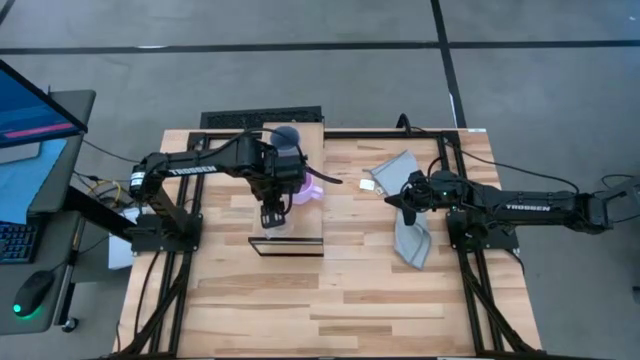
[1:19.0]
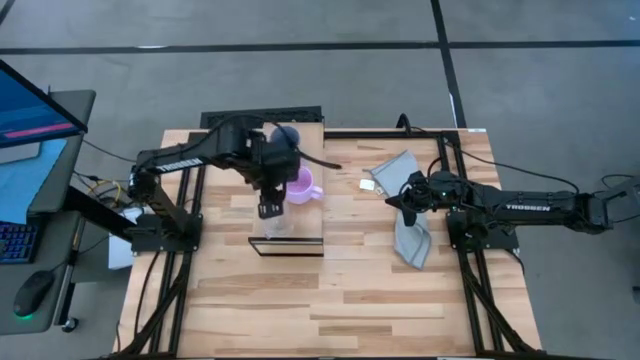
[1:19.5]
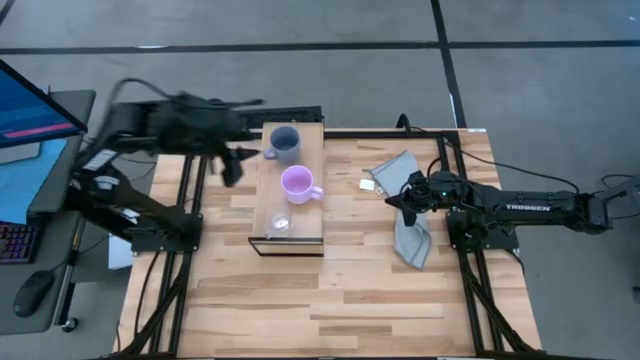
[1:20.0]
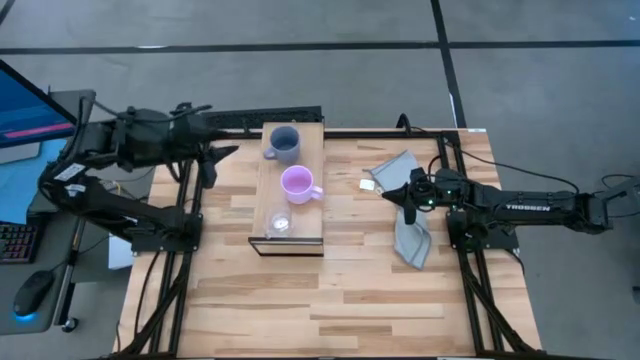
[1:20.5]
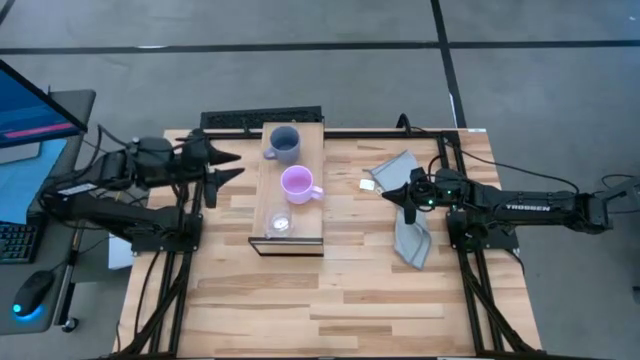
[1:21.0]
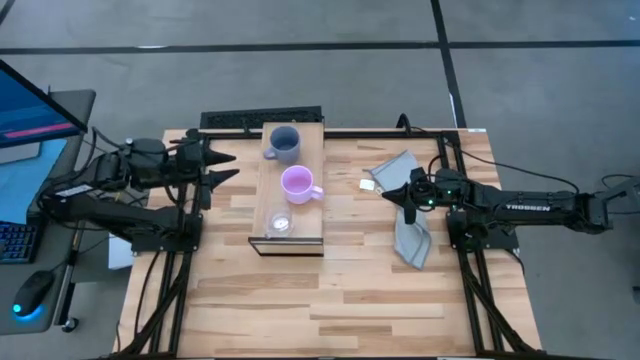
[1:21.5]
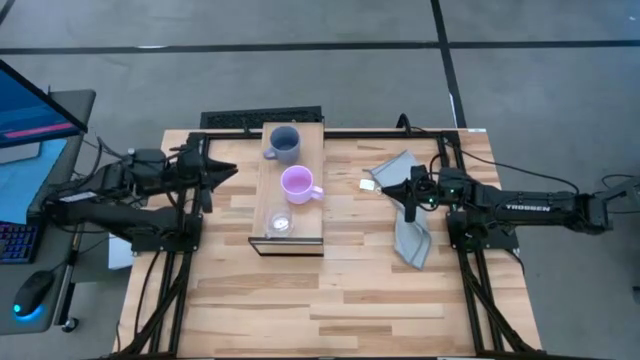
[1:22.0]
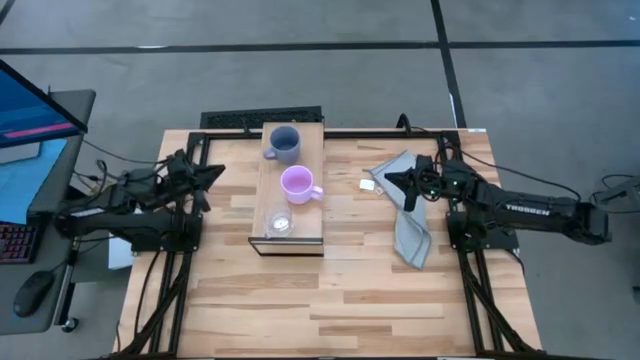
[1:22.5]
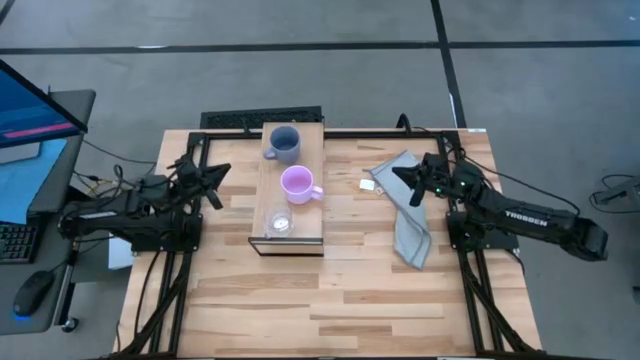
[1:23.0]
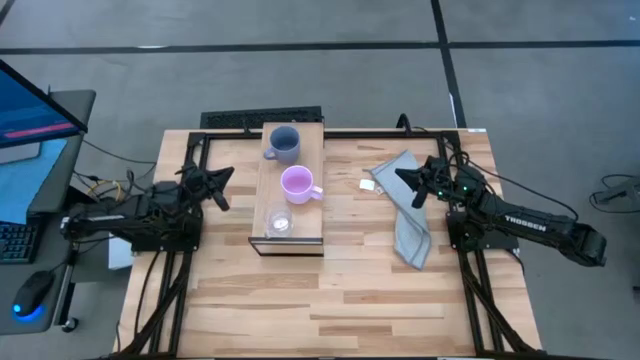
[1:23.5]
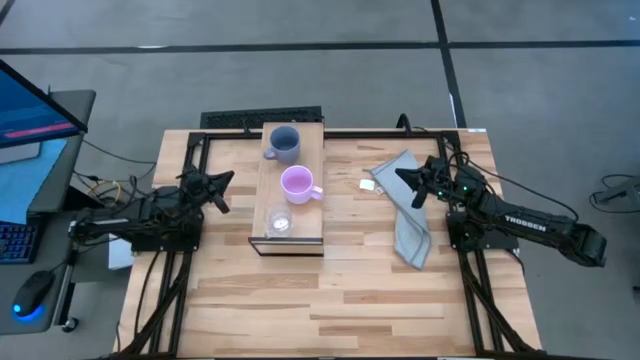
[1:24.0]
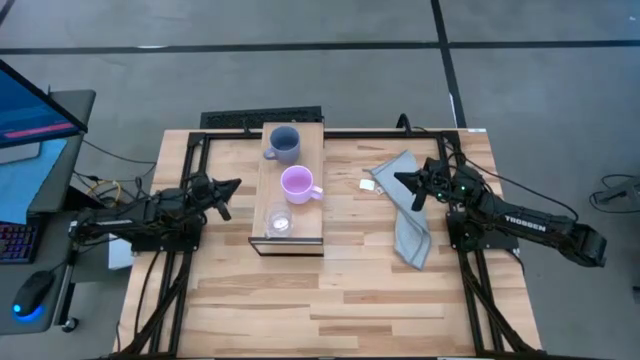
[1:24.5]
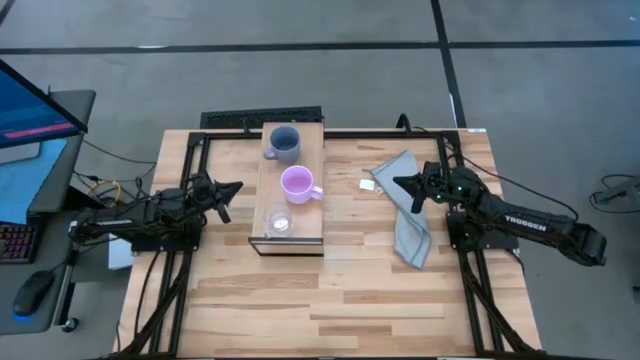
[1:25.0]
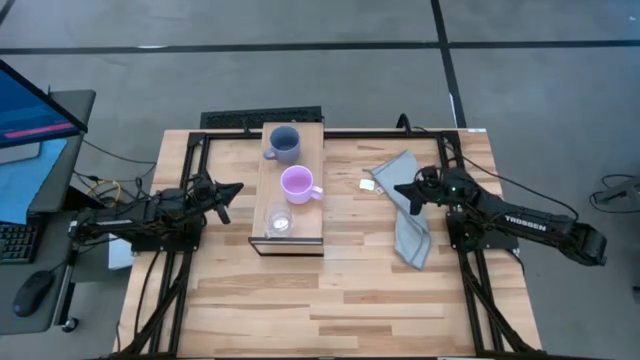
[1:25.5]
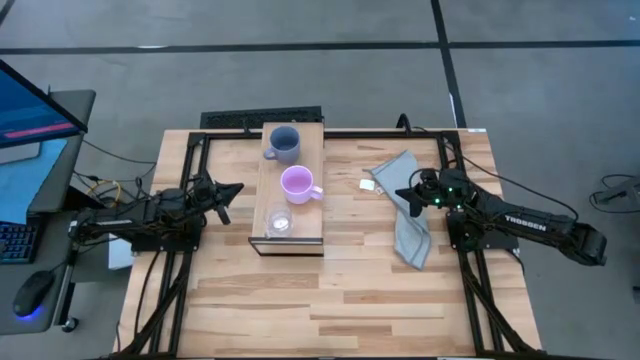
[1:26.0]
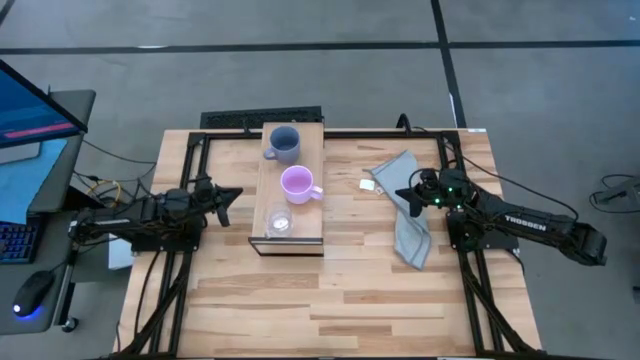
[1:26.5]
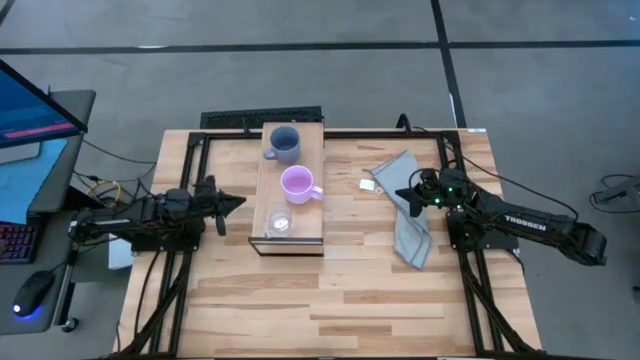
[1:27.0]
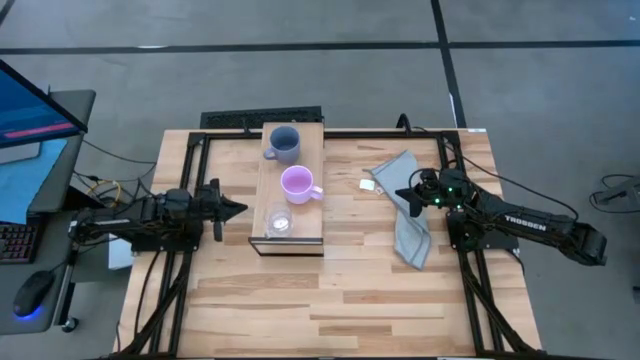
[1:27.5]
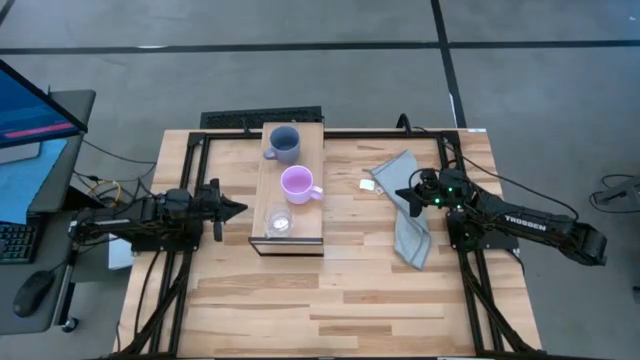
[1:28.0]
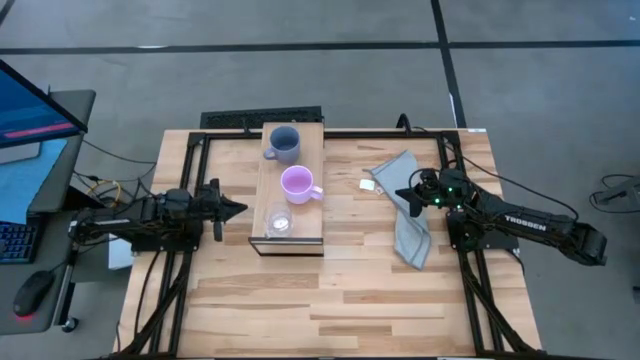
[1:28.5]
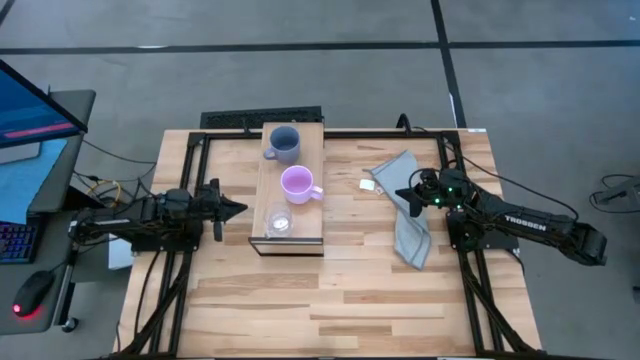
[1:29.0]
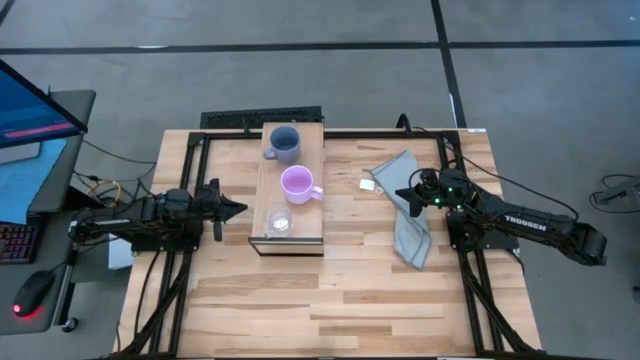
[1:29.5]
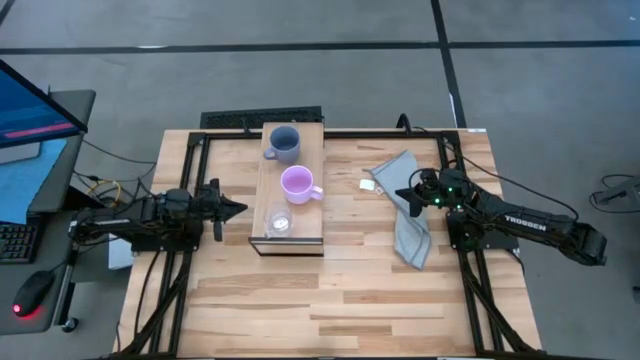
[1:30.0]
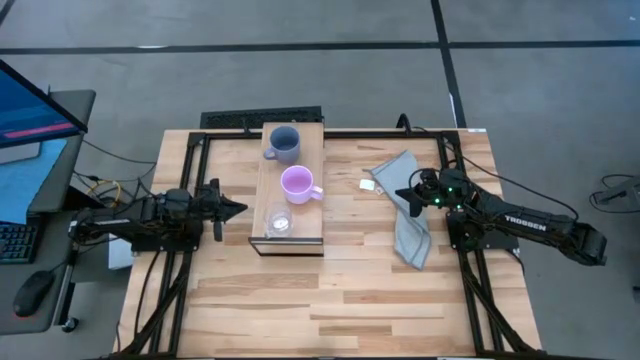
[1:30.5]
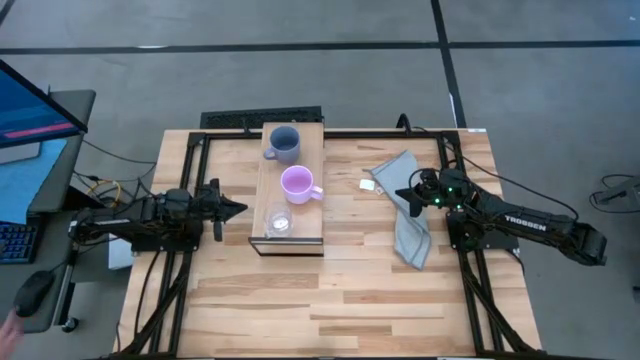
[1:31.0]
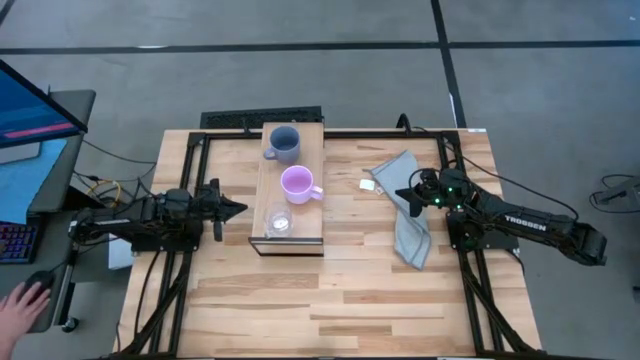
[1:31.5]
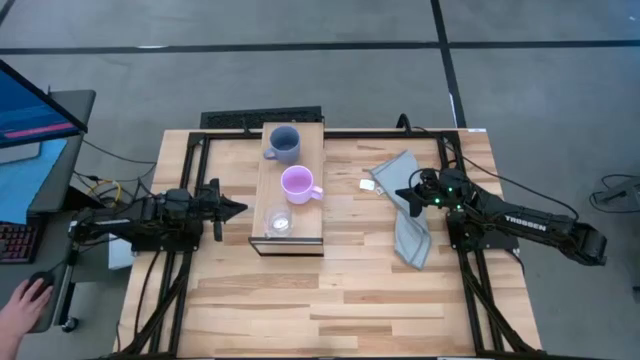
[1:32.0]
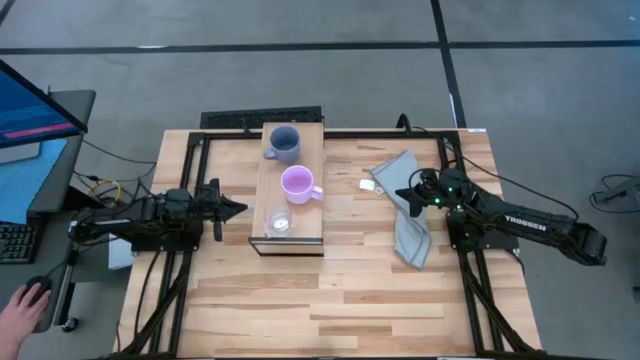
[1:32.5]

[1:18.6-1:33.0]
Task: Stack small to large cups/mugs on shelf
Return to Home Position

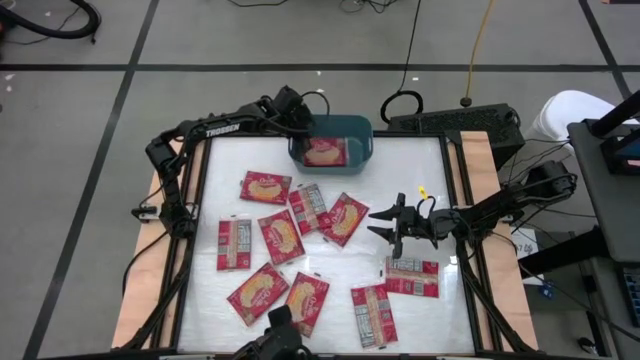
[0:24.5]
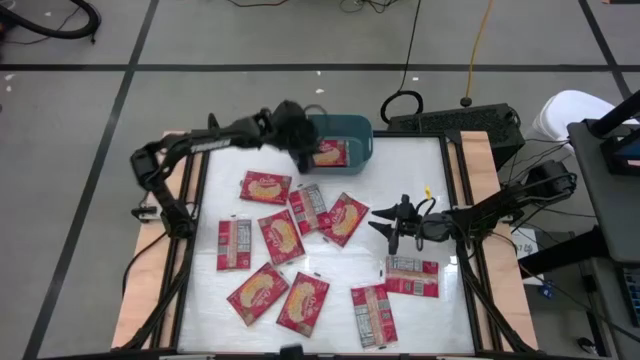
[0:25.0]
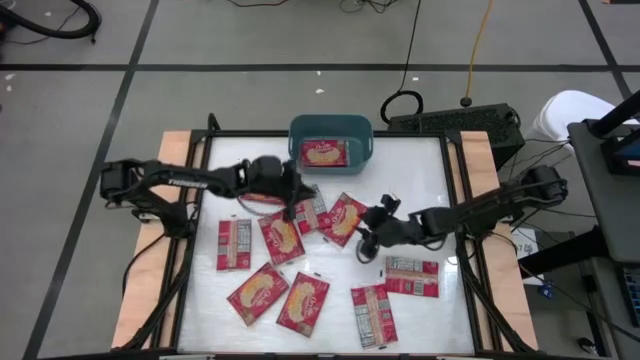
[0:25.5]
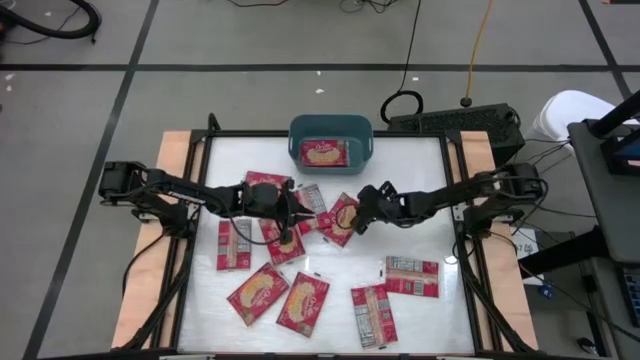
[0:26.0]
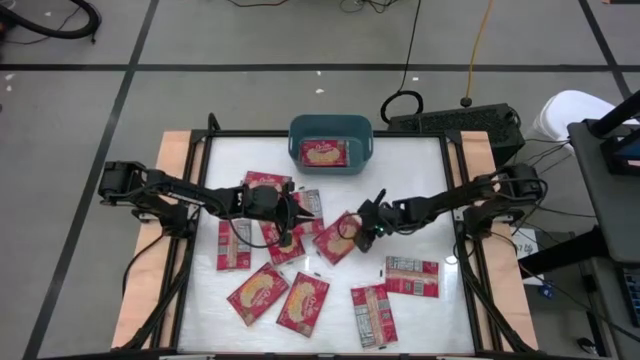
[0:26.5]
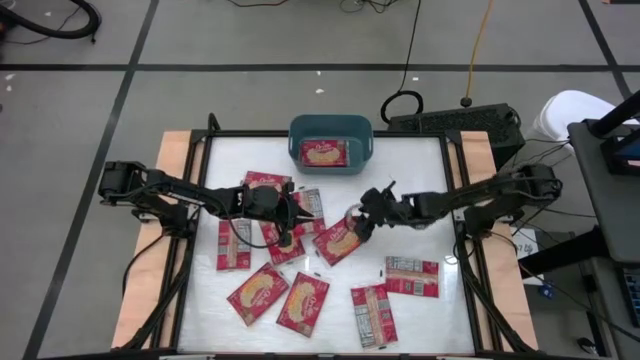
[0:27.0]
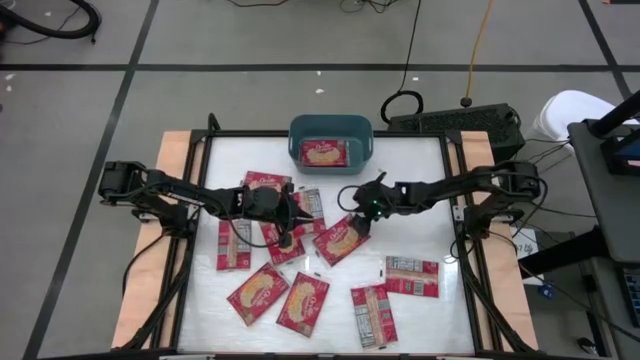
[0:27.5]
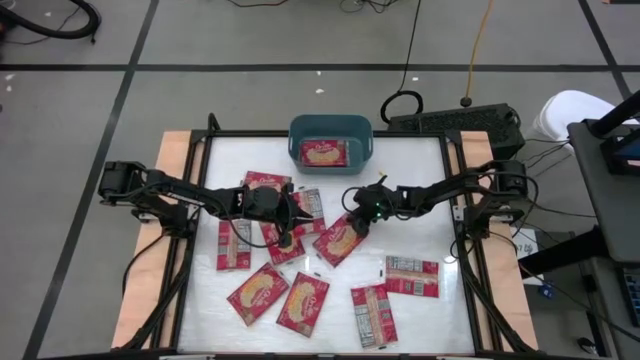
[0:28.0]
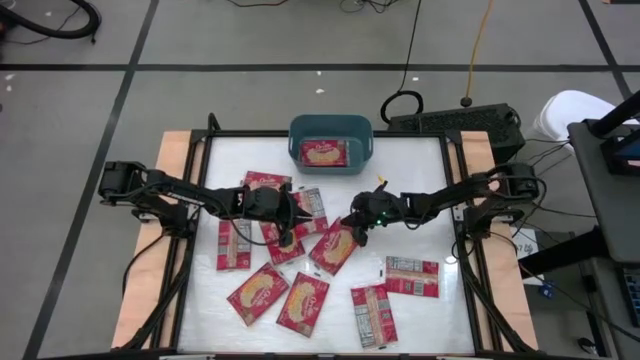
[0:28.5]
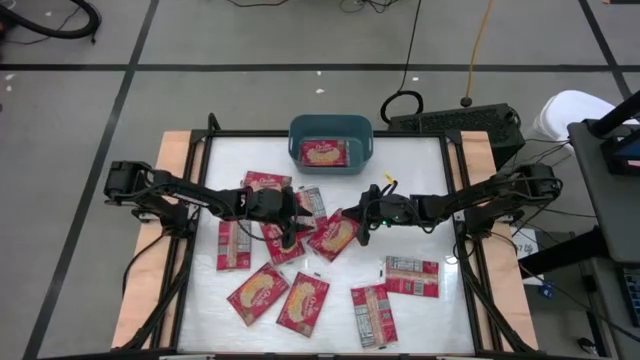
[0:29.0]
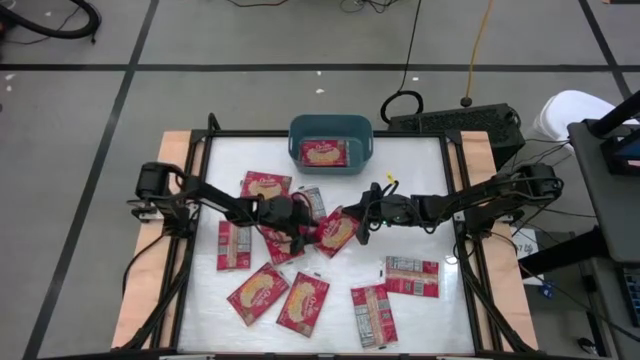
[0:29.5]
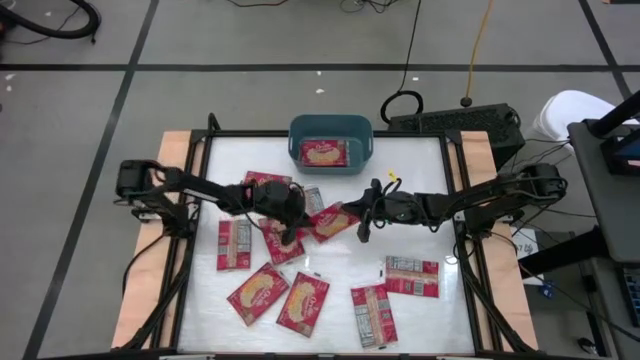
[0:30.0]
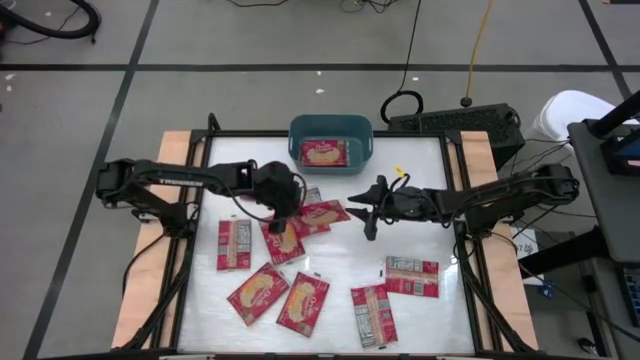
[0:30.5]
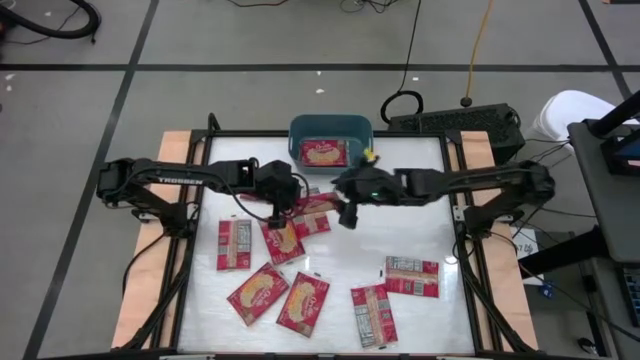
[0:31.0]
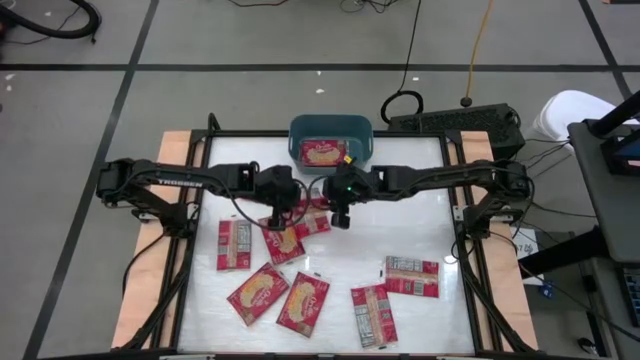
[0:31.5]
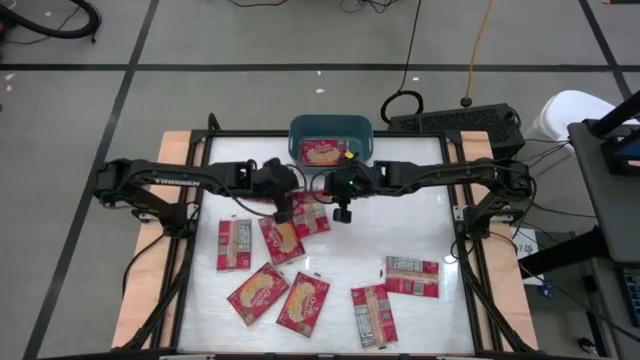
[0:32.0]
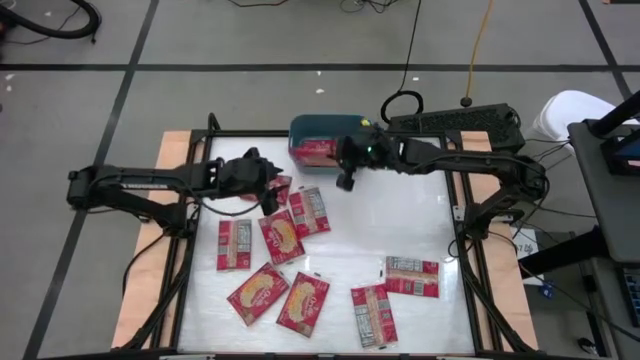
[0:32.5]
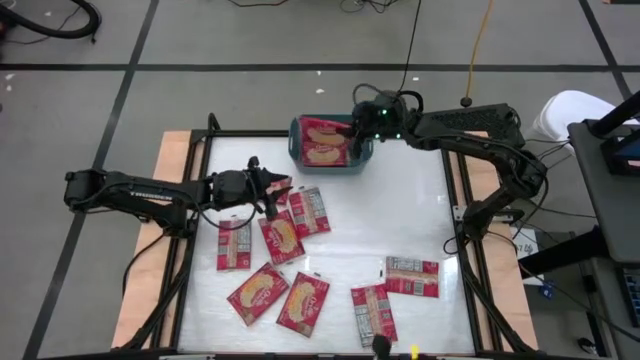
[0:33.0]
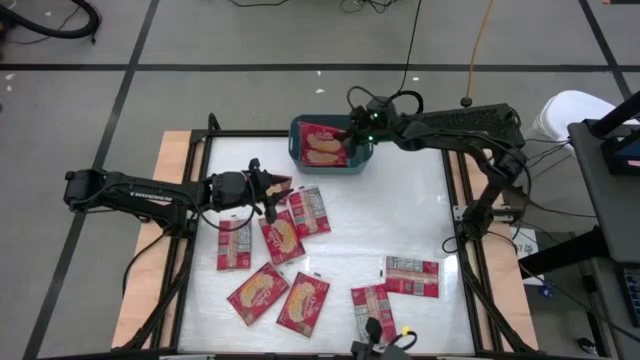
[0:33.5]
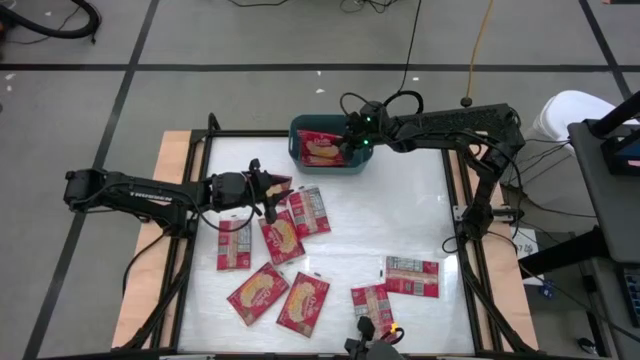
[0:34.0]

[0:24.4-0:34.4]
Task: Sort popcorn bags into baskets
Put the red popcorn bag into the green bin
